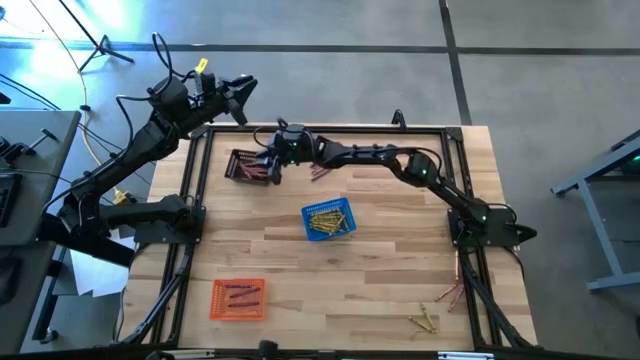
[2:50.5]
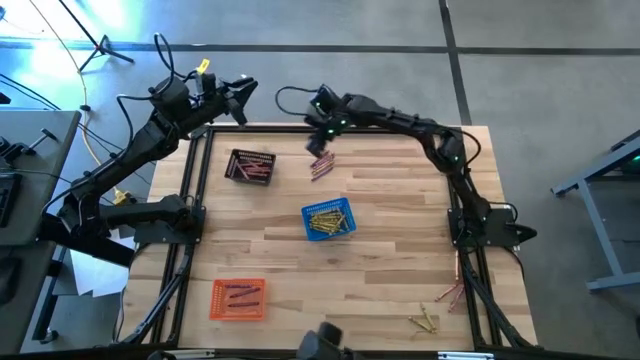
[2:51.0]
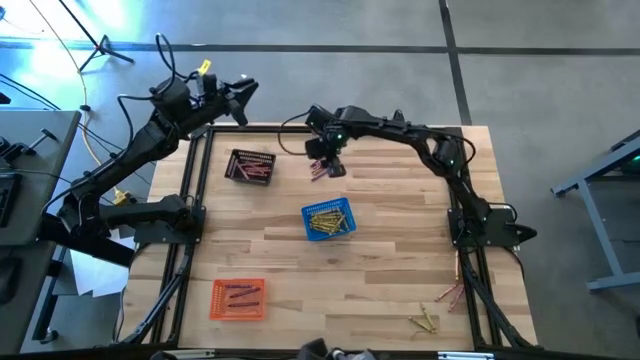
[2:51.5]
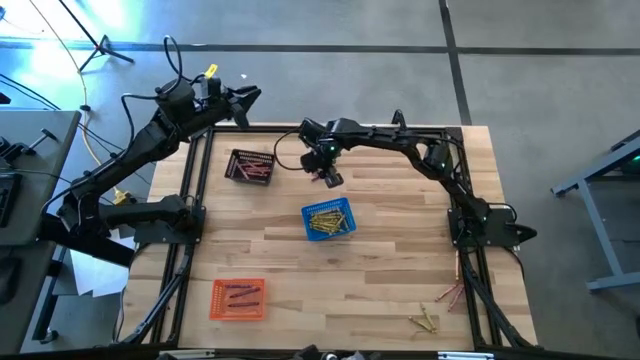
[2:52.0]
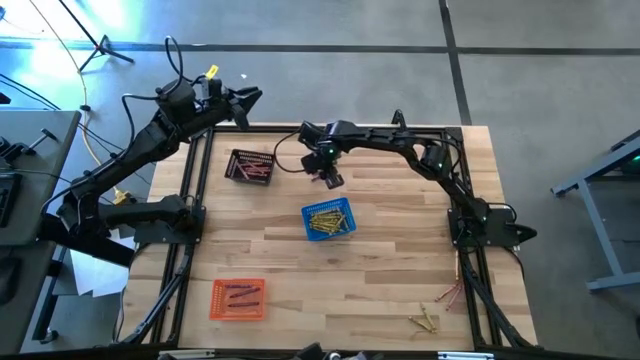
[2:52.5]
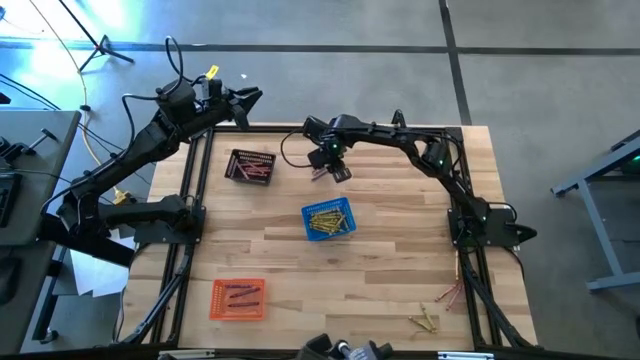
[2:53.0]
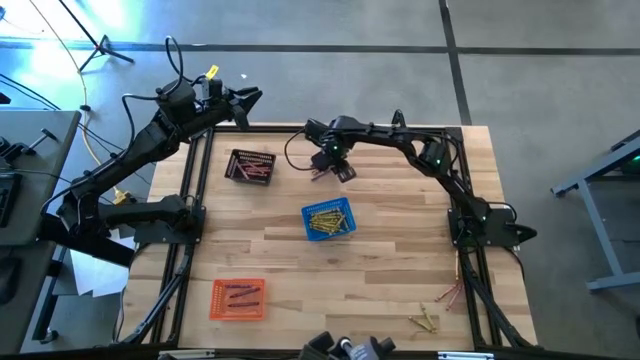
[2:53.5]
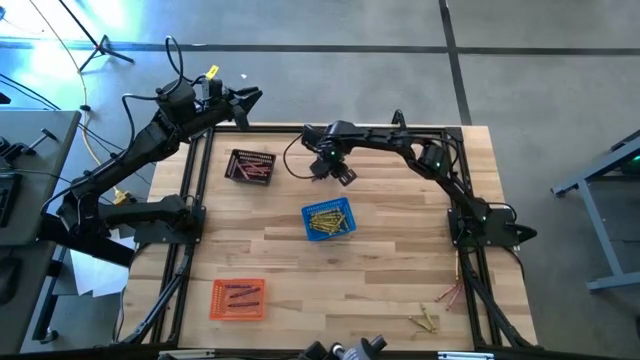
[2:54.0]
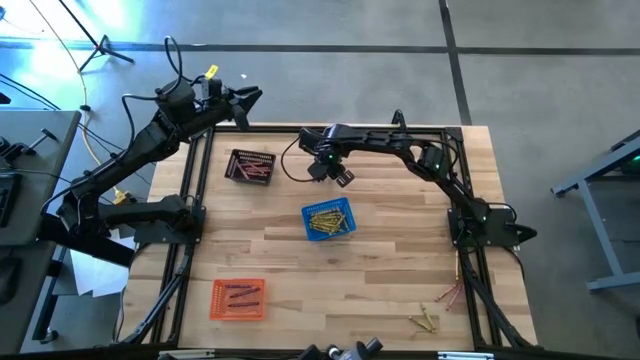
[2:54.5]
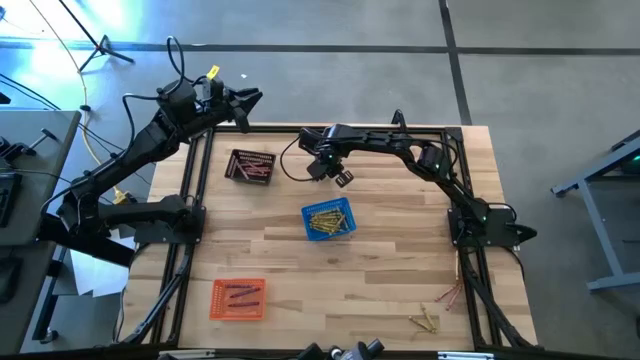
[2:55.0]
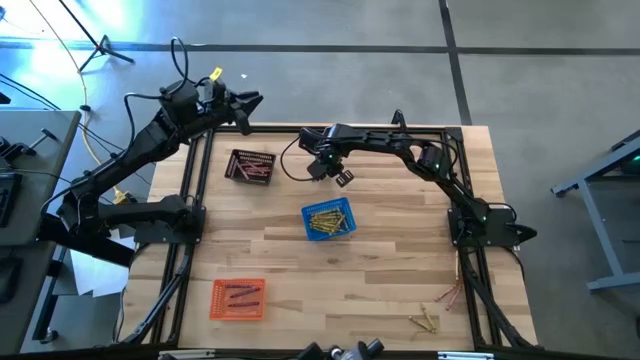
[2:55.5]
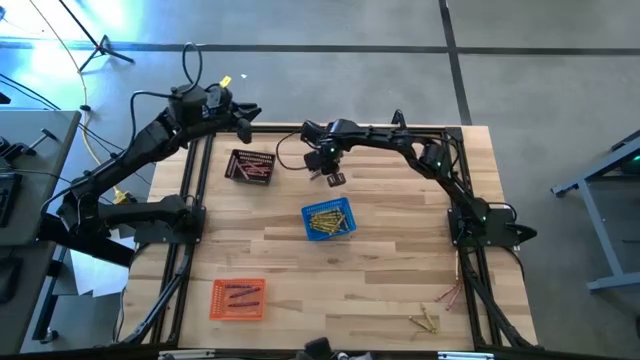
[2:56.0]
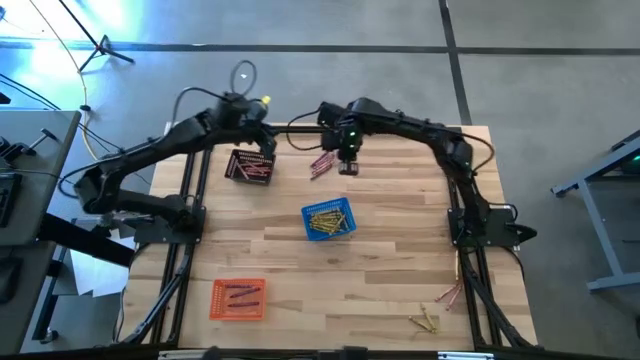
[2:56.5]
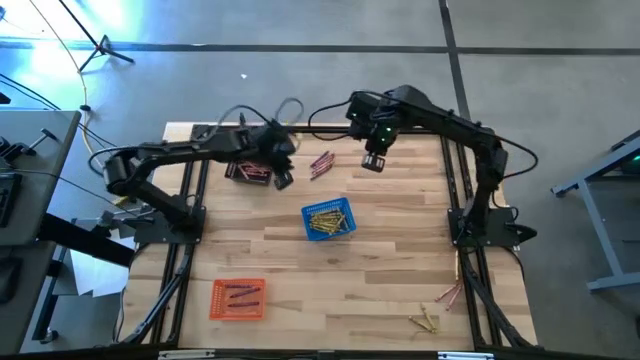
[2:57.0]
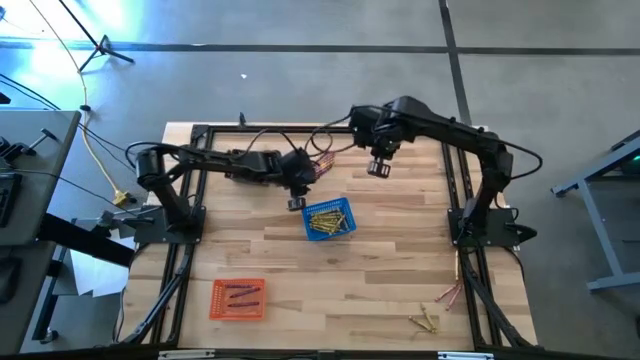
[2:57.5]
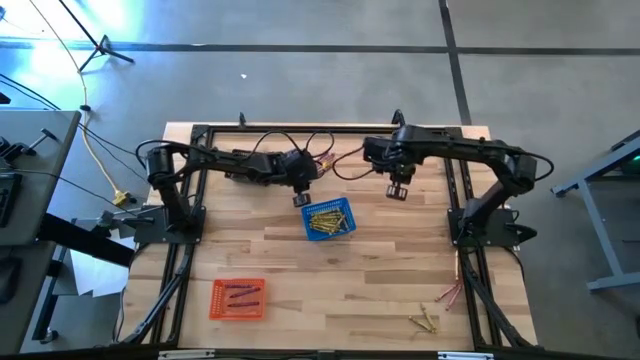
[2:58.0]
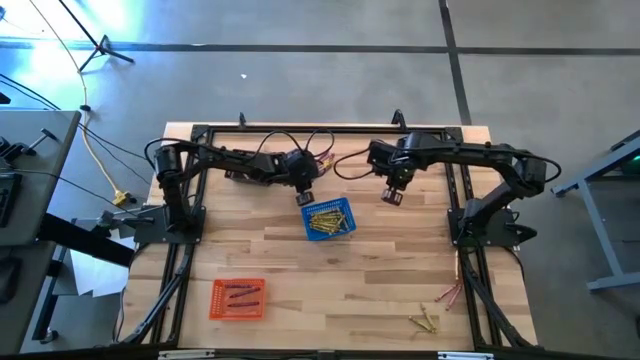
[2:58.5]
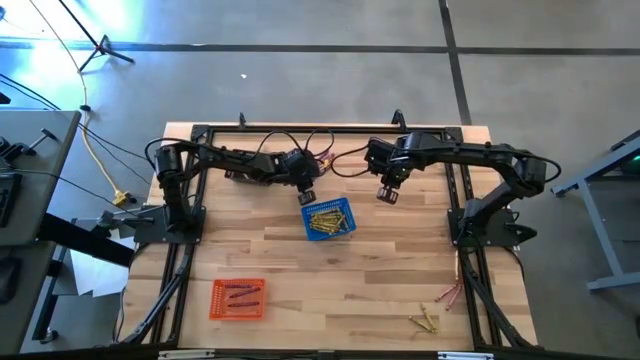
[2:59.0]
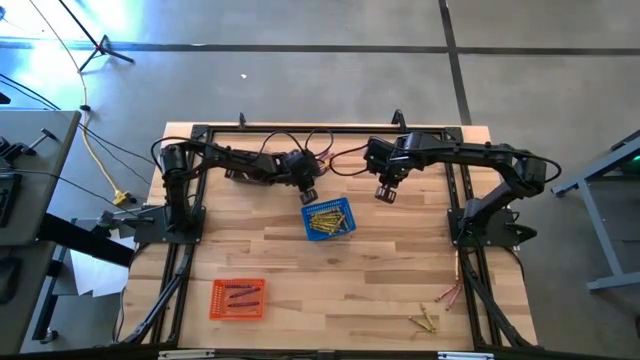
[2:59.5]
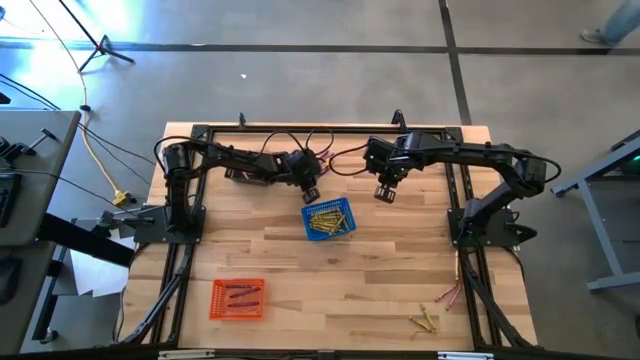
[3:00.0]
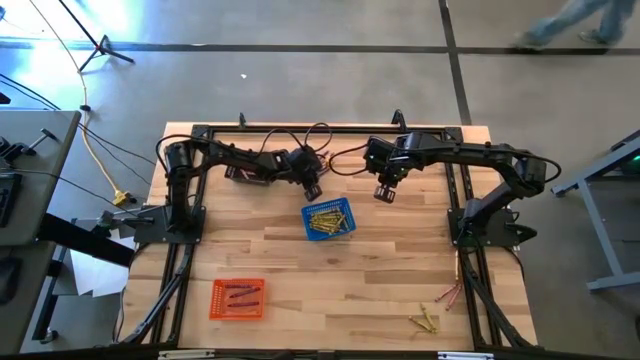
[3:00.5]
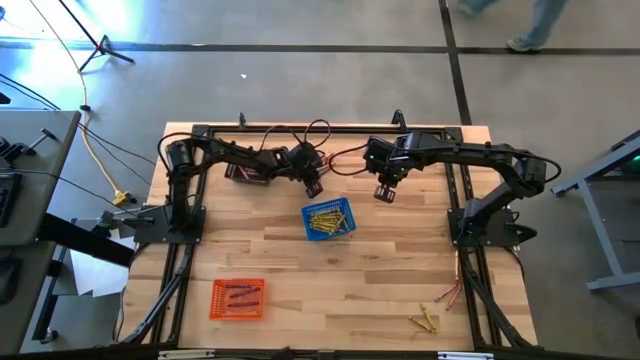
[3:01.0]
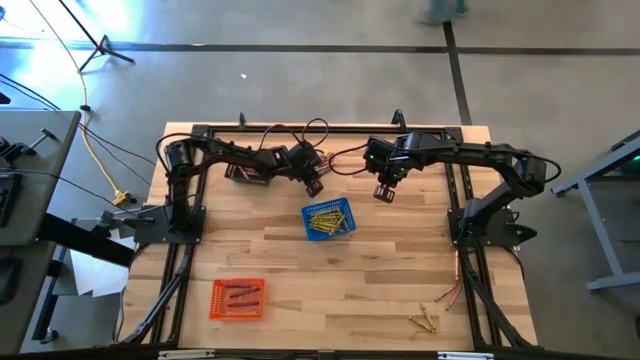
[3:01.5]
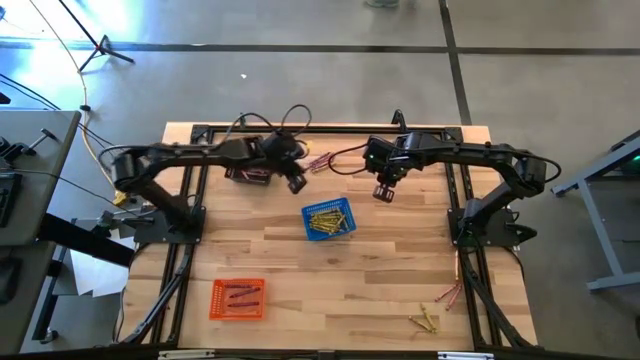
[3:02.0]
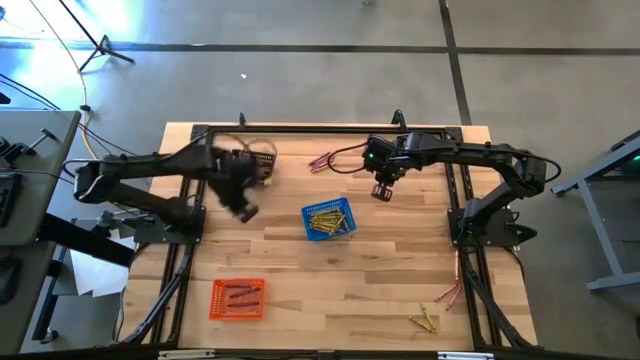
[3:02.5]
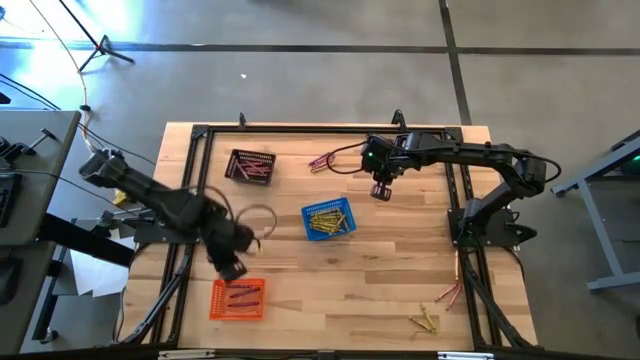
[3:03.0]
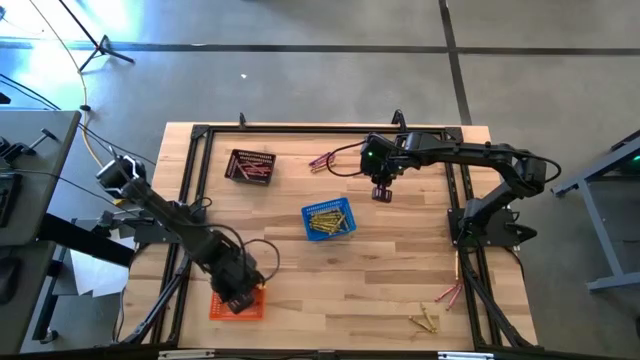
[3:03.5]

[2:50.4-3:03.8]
Task: Sort crayons
Put the violet crayon into the orange basket

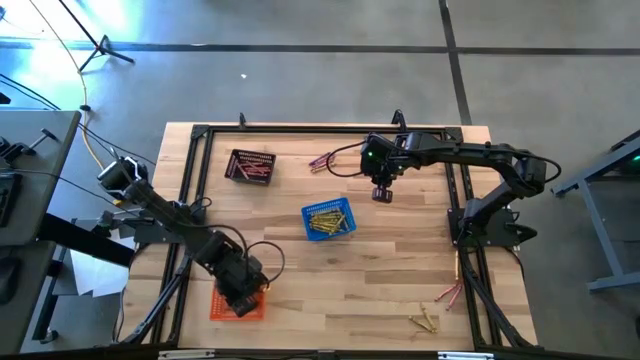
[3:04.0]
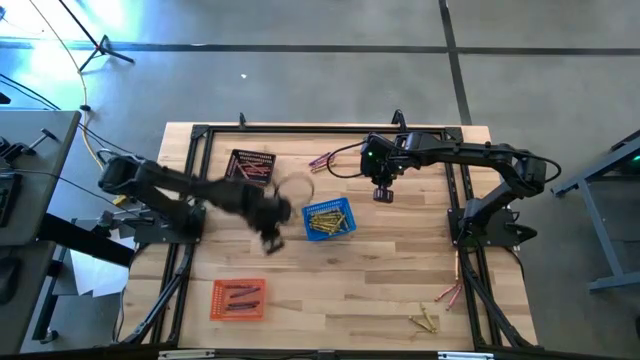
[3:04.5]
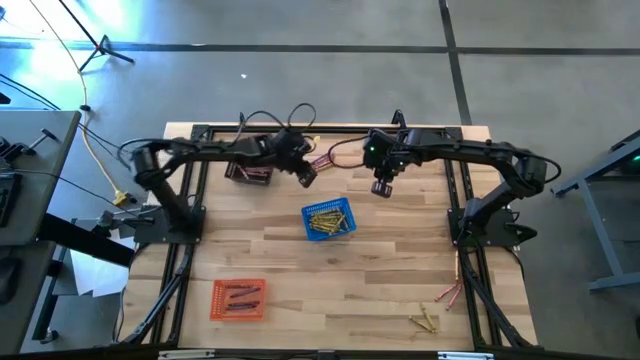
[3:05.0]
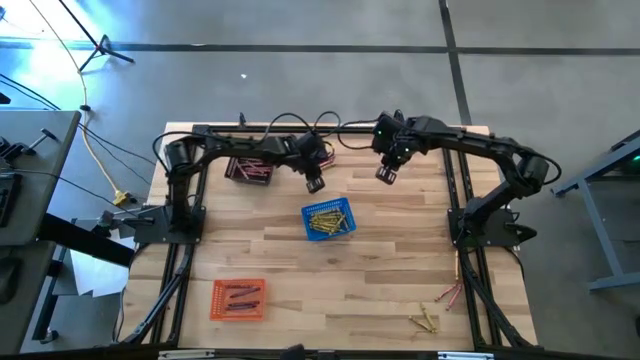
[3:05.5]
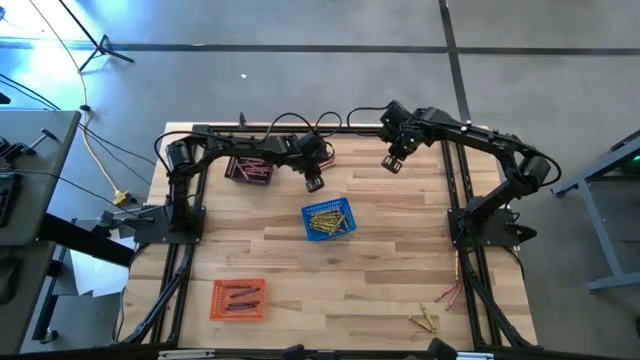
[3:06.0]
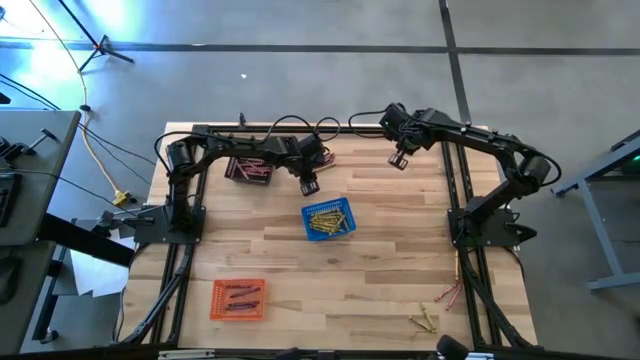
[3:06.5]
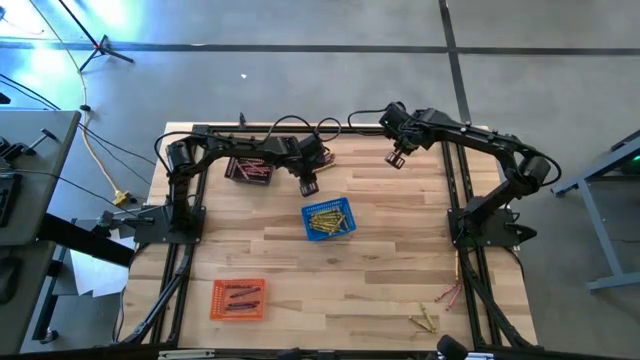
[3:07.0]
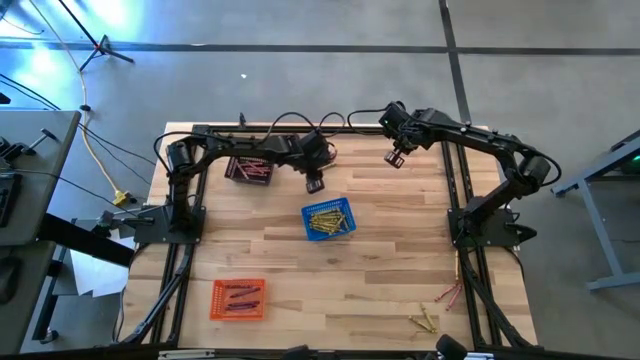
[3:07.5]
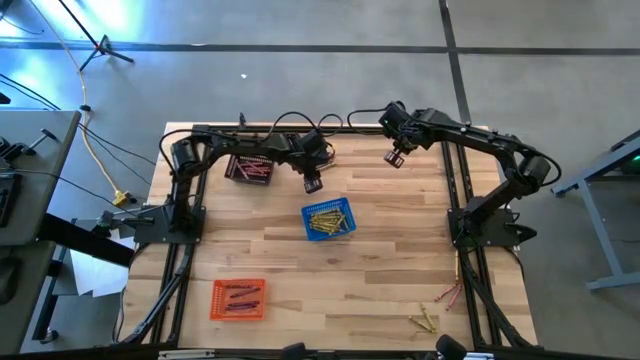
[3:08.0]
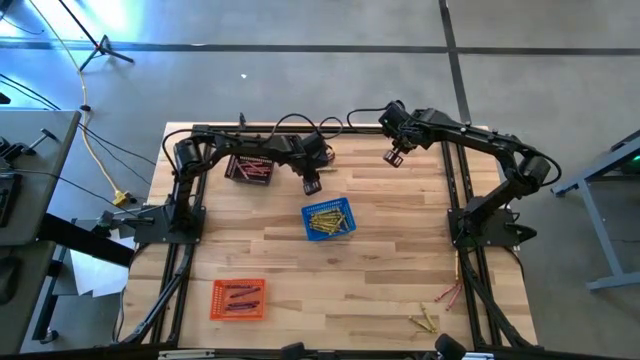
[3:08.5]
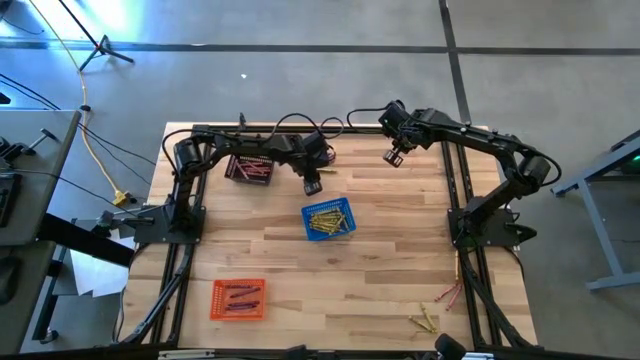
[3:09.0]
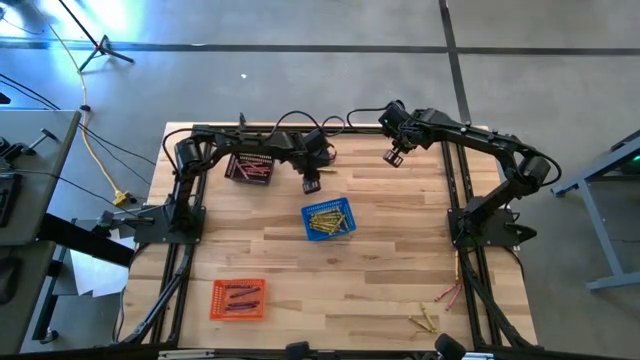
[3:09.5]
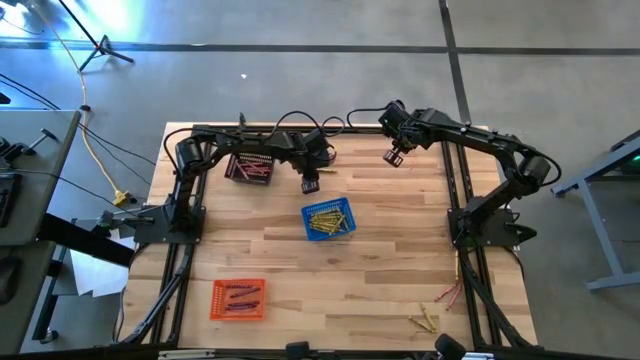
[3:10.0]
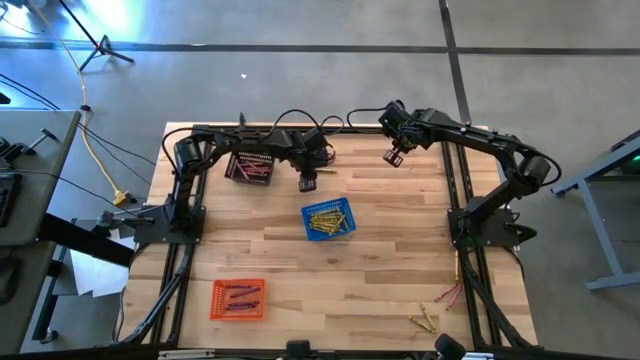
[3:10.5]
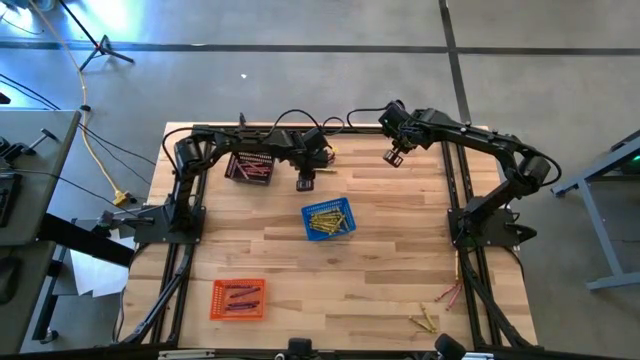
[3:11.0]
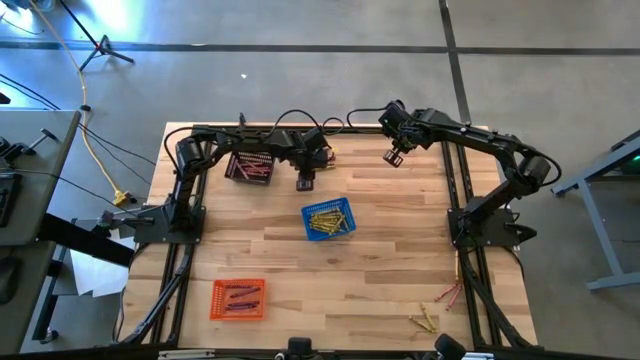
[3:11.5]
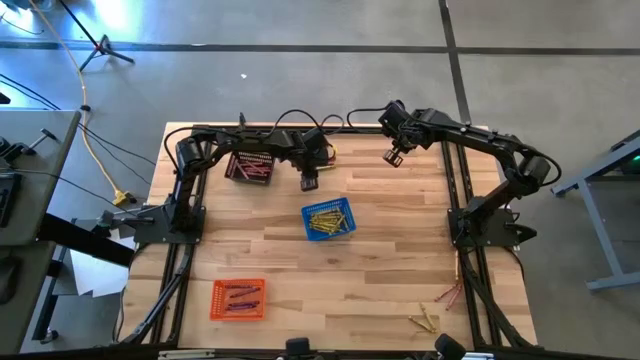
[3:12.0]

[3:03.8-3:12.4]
Put the yellow crayon into the blue basket
